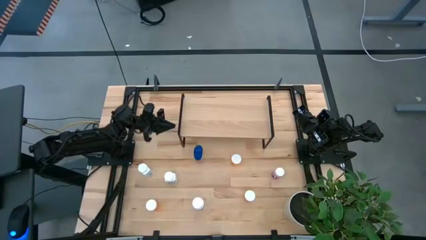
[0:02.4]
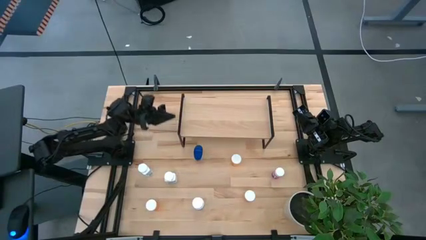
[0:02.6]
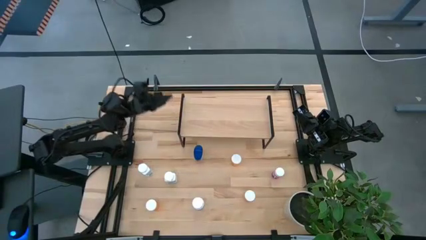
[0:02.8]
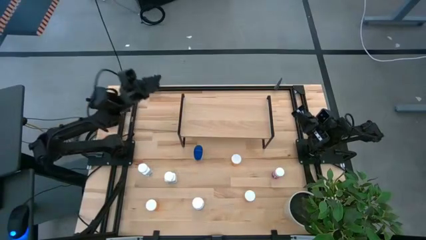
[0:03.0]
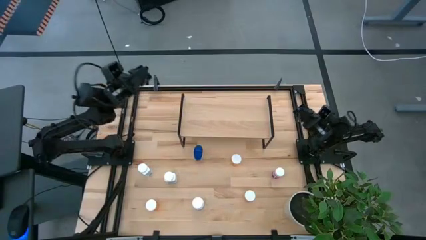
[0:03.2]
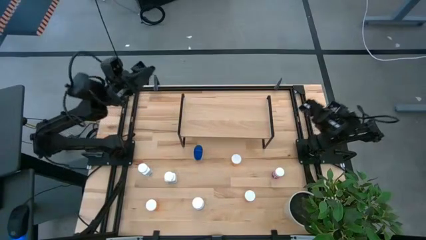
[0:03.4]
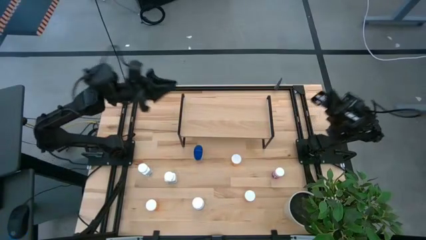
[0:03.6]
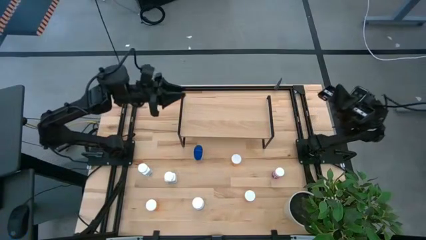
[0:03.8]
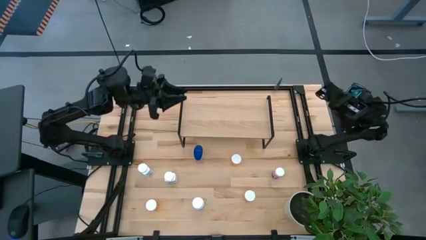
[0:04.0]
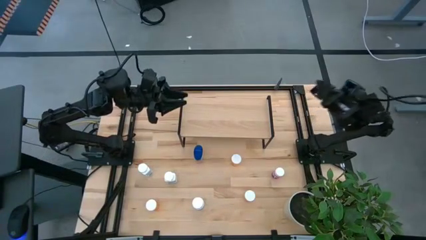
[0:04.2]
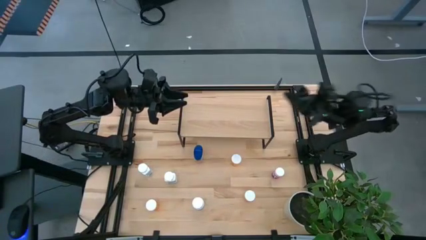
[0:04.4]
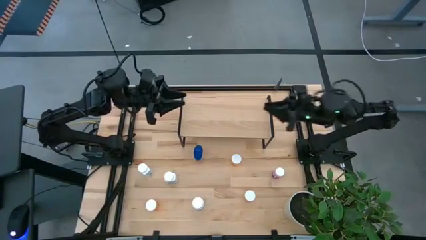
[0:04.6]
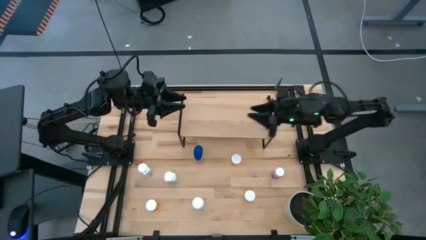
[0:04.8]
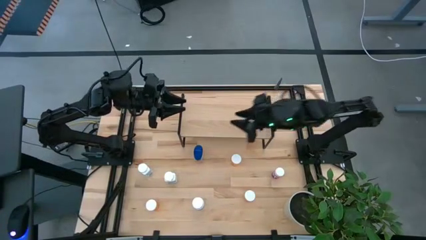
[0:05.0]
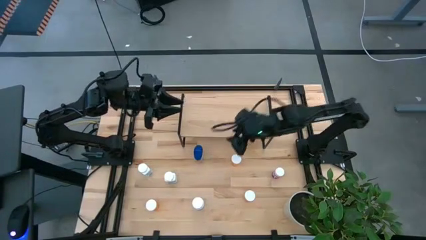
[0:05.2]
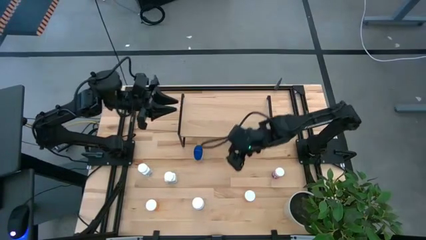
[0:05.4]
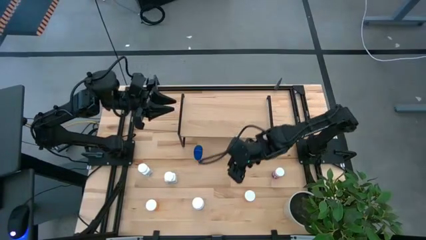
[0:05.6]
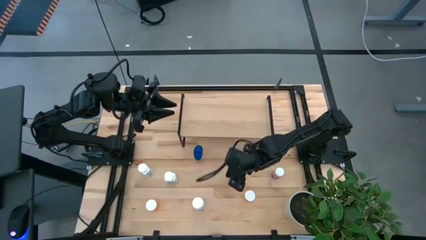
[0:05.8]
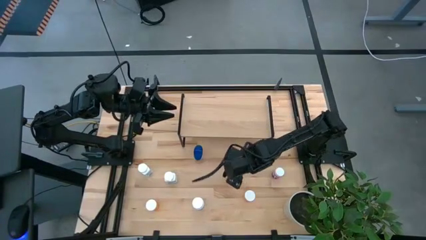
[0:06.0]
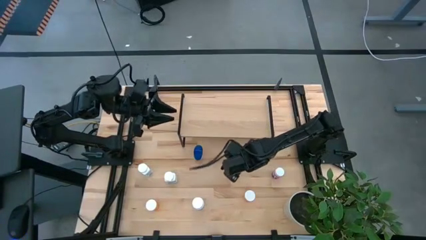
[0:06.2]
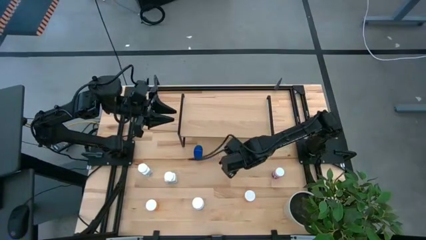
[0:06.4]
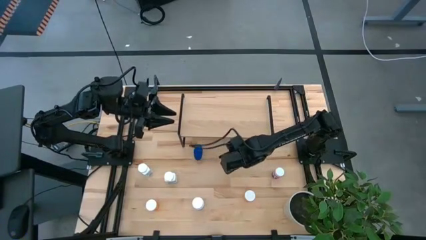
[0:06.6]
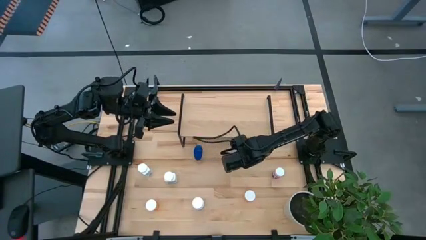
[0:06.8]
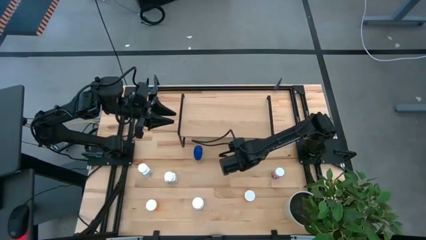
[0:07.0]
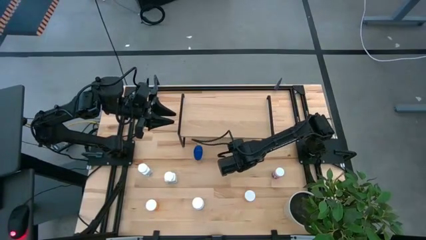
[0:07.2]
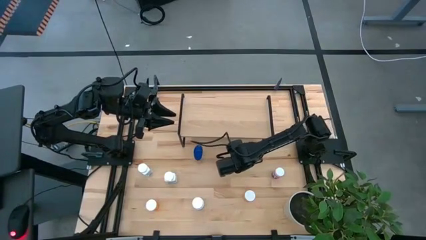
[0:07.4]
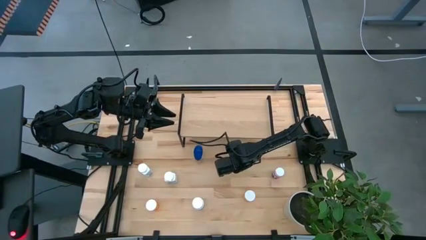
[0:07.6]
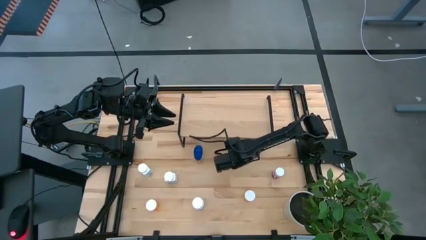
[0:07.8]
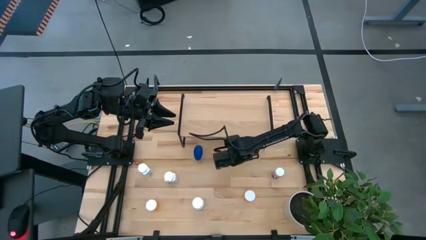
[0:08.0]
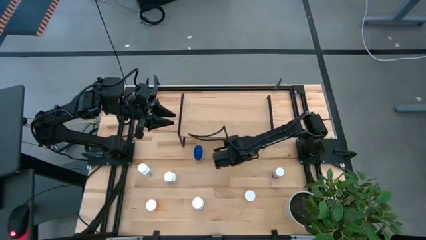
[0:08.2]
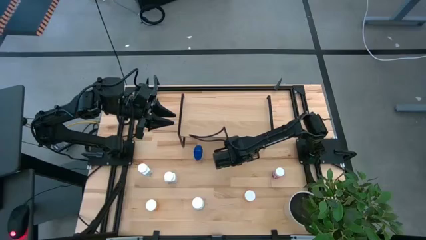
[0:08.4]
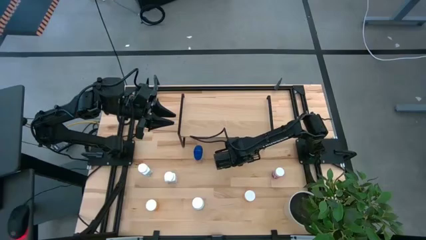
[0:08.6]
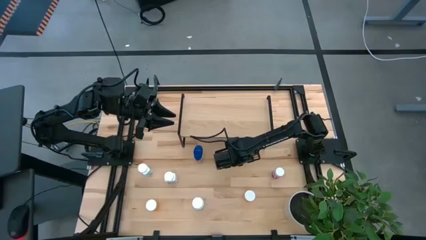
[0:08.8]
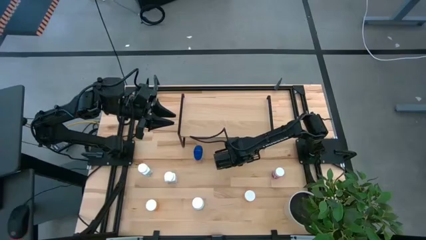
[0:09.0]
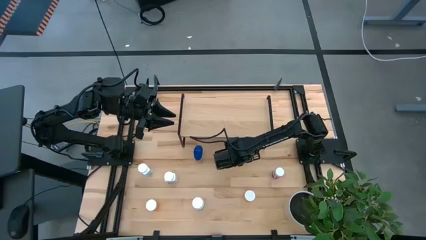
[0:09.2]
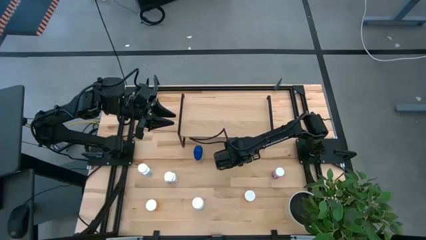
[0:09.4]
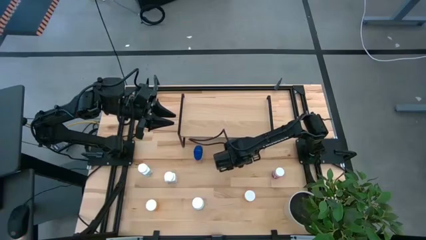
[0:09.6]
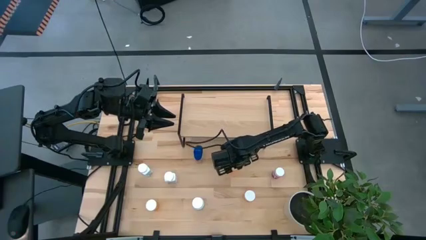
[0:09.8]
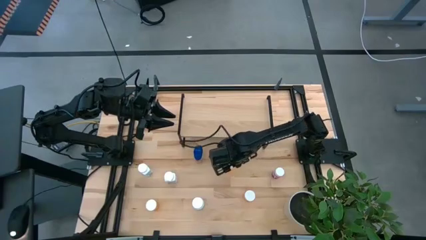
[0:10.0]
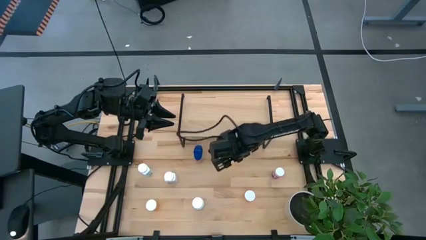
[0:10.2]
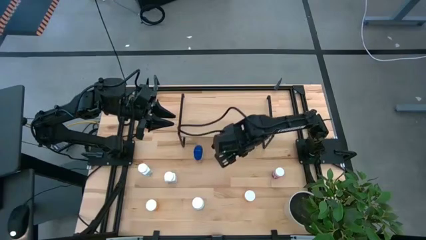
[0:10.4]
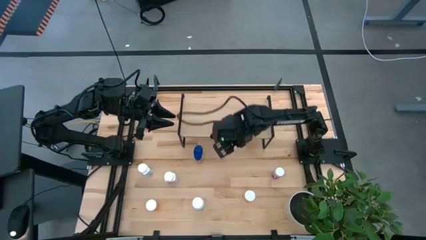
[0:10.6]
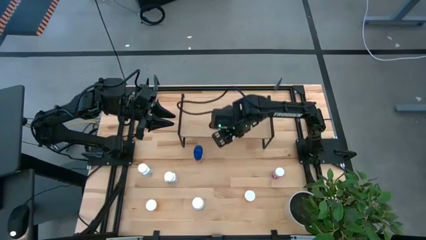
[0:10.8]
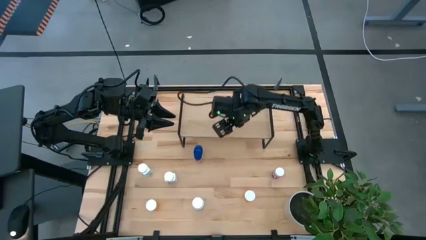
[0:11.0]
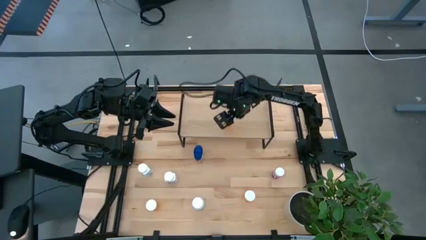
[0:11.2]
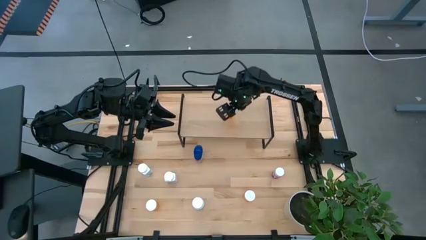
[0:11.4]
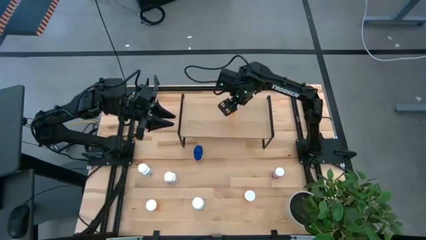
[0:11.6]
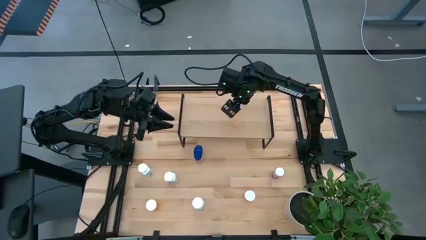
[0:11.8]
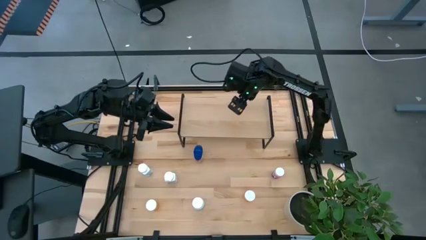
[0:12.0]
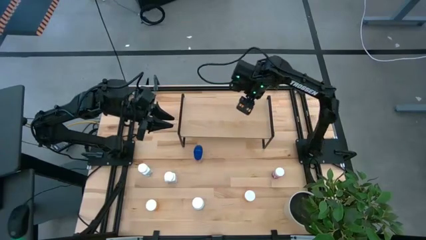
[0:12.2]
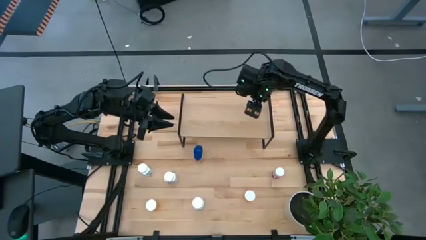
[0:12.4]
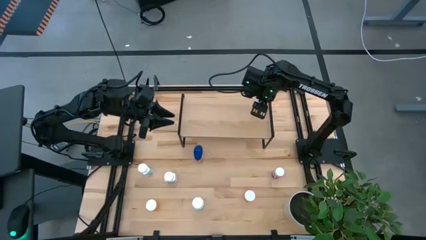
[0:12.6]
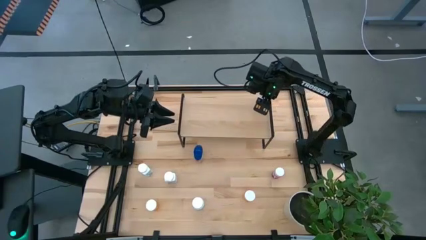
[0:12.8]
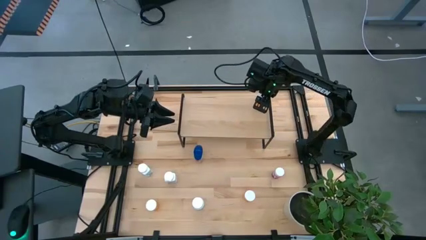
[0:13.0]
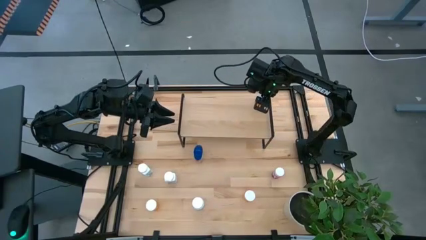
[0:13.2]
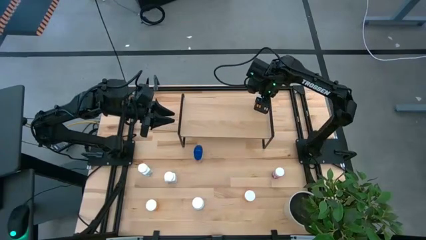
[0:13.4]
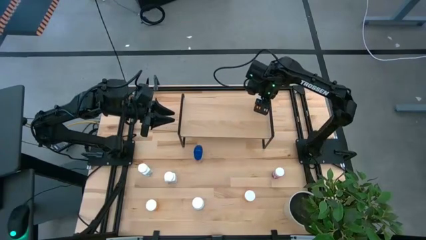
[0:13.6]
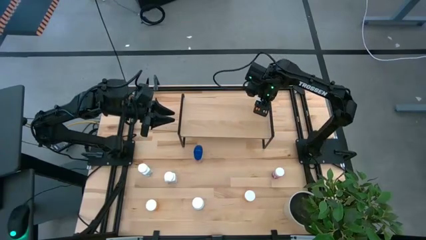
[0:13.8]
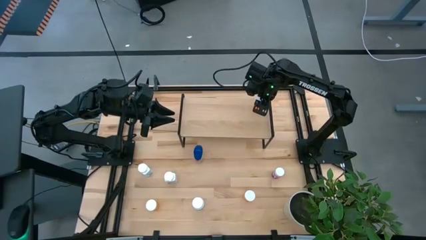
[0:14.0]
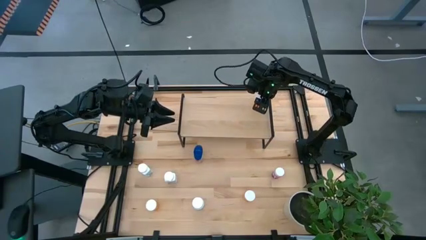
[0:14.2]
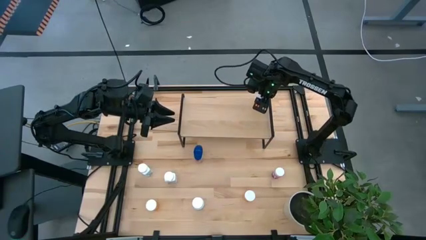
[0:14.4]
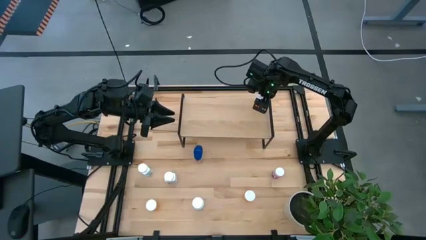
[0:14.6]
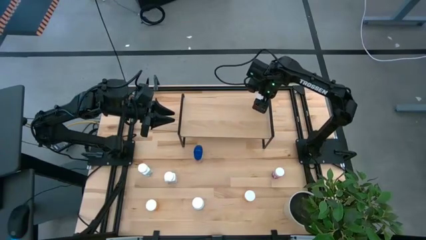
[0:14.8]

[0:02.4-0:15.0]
Task: Pick and place medicine bottles onto shelf by color
Put the top right orange pill bottle on the shelf

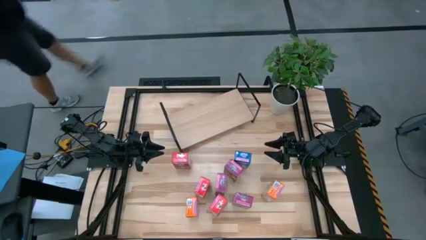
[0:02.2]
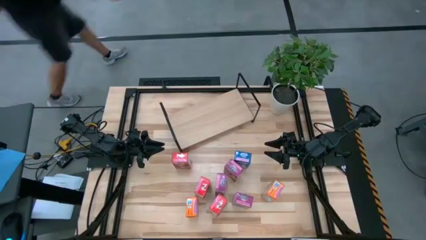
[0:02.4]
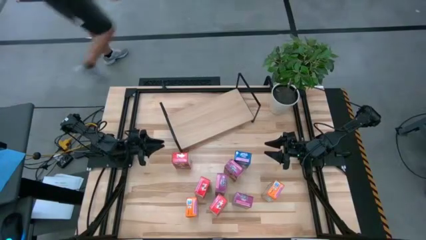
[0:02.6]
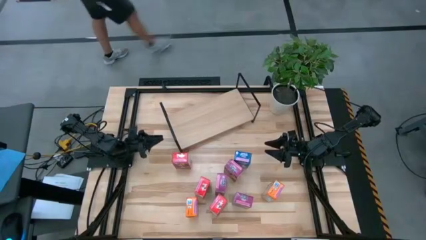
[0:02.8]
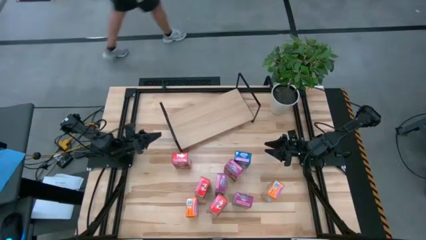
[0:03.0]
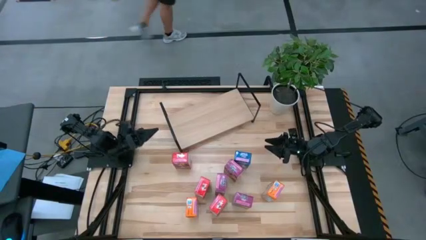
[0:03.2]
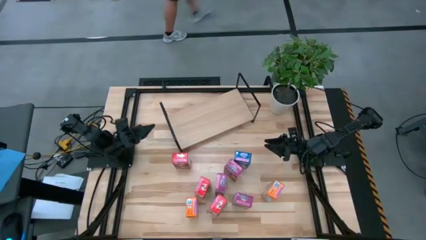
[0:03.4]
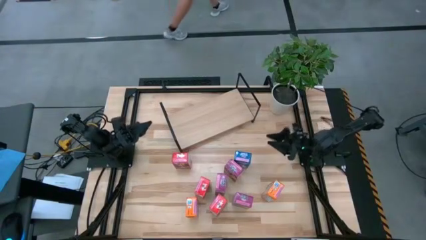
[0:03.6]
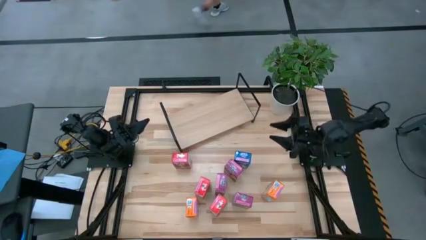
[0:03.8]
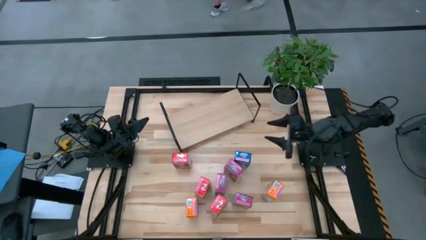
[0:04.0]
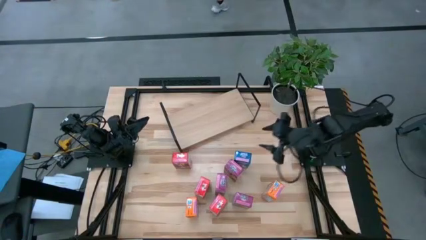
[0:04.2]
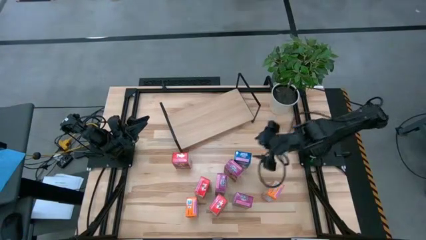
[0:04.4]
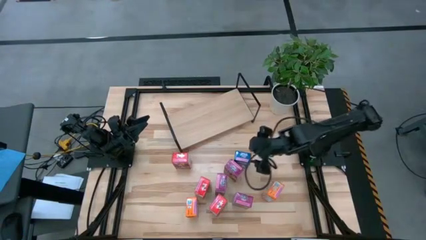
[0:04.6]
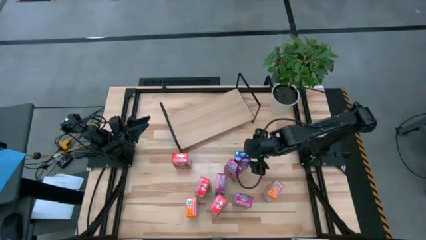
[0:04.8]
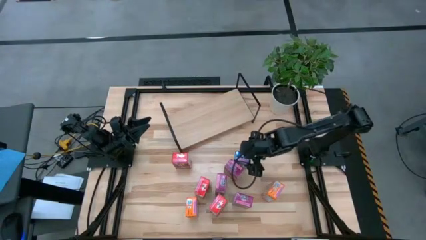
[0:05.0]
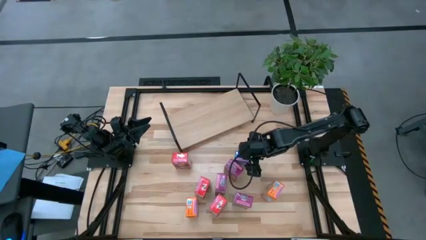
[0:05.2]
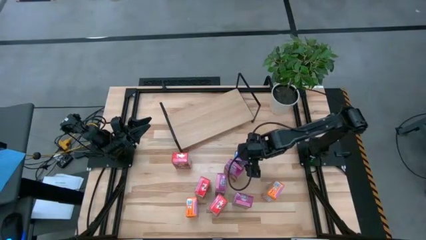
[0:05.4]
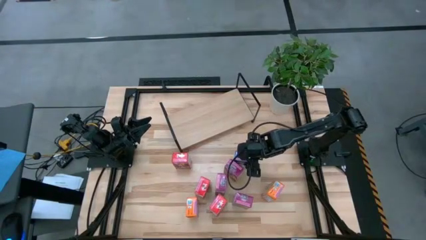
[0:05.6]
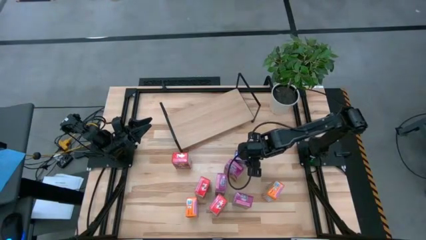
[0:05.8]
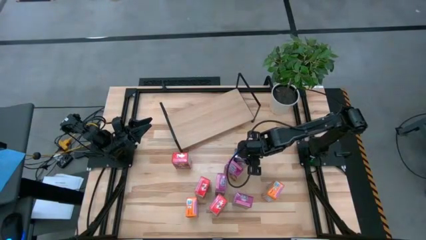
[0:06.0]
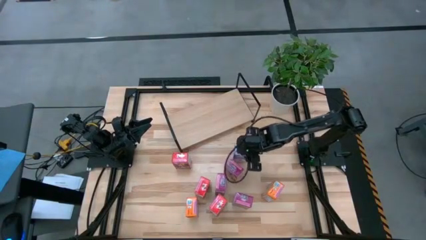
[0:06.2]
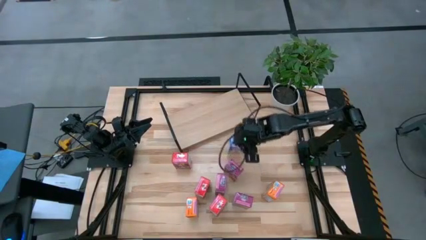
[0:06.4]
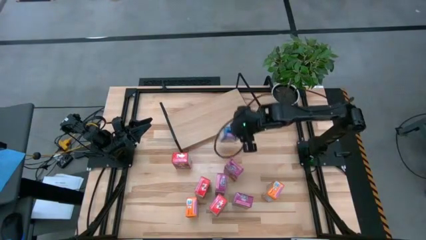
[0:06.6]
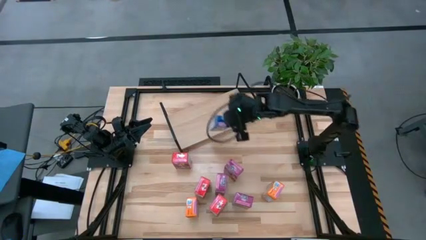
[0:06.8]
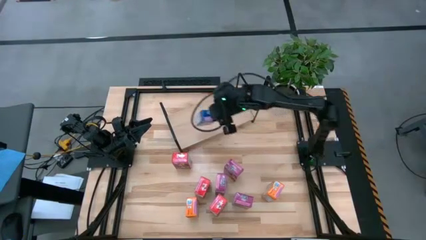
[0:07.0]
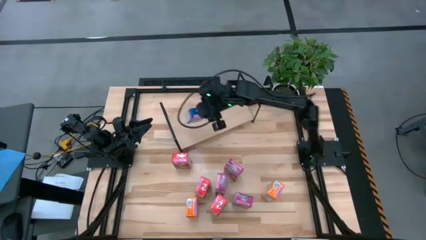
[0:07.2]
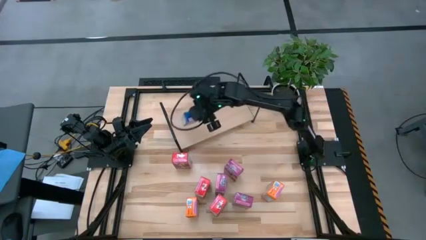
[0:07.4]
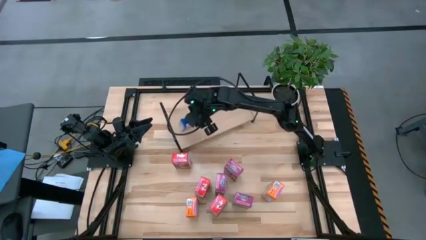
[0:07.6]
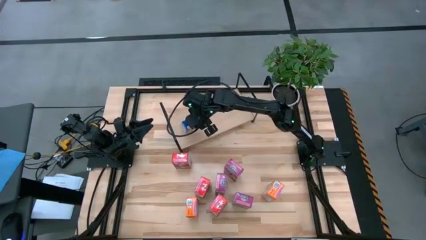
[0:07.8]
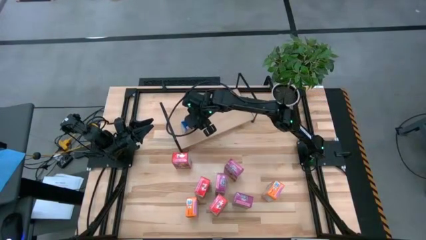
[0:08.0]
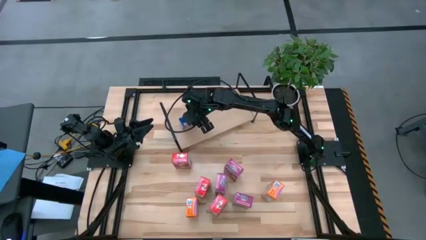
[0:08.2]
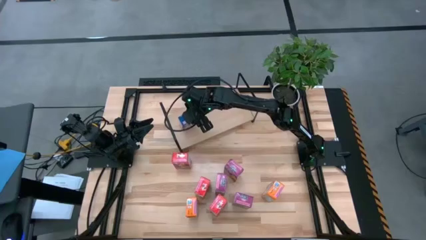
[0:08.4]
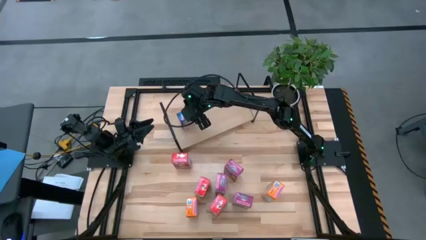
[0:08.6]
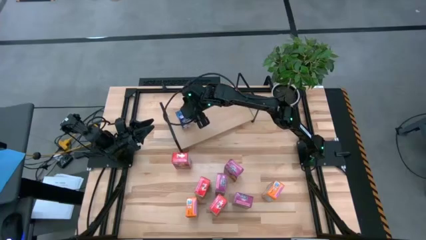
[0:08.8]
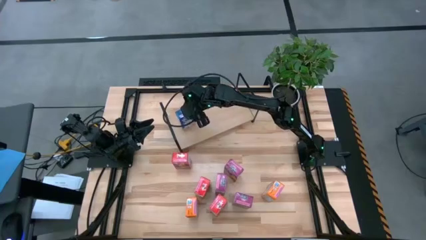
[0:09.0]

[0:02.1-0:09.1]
Task: Stack cereal on shelf
Put the blue cereal box on the shelf
